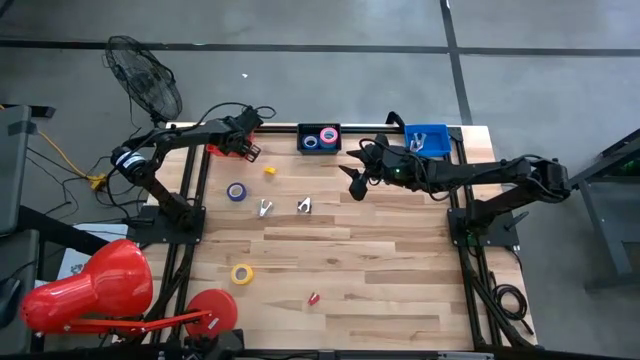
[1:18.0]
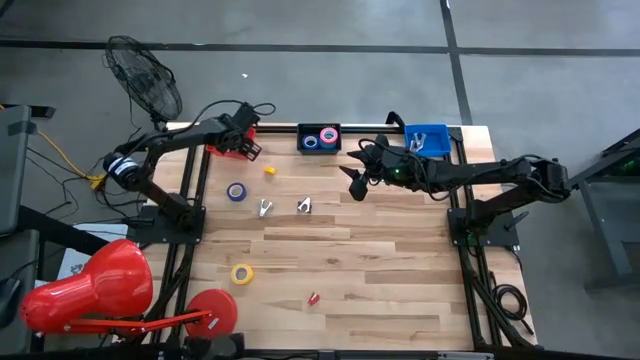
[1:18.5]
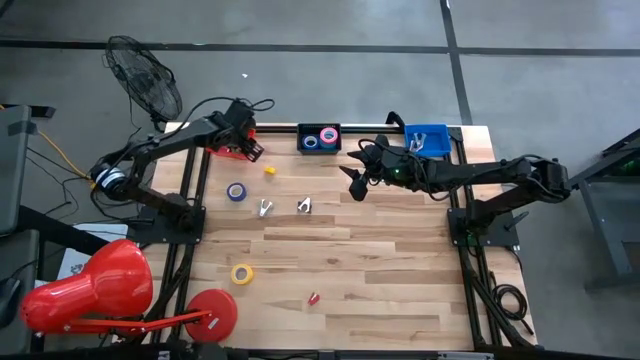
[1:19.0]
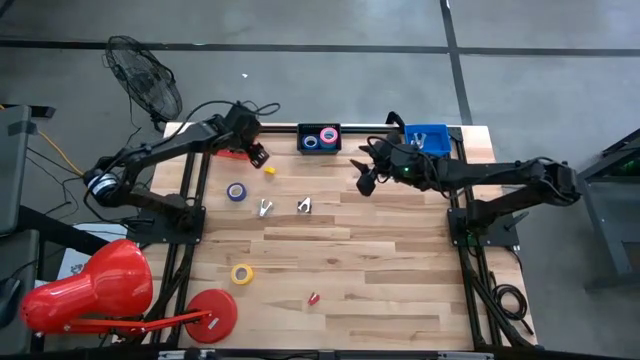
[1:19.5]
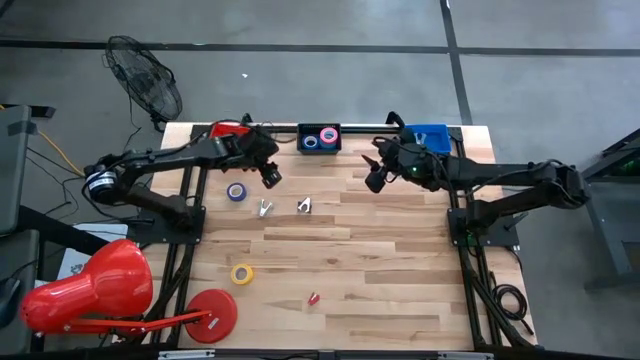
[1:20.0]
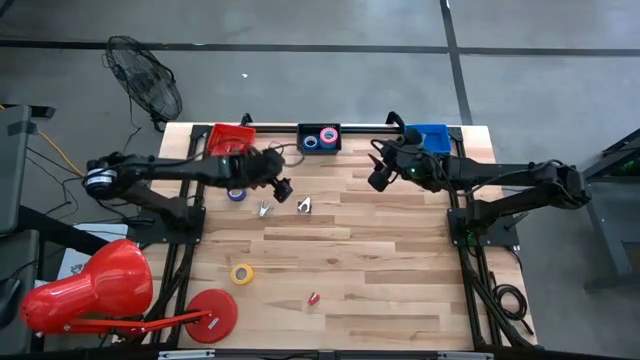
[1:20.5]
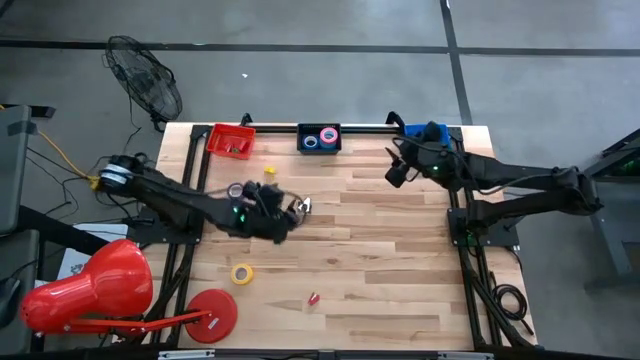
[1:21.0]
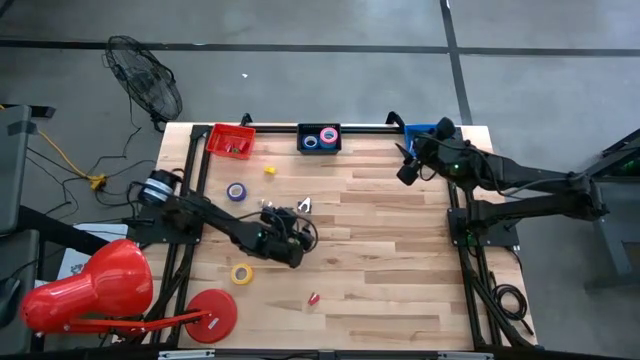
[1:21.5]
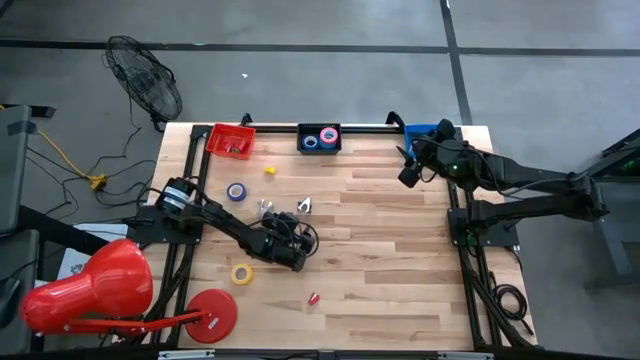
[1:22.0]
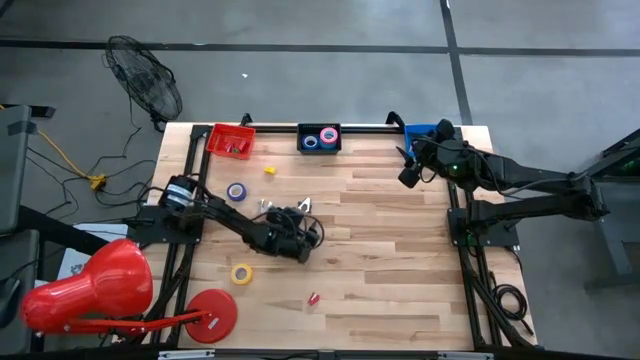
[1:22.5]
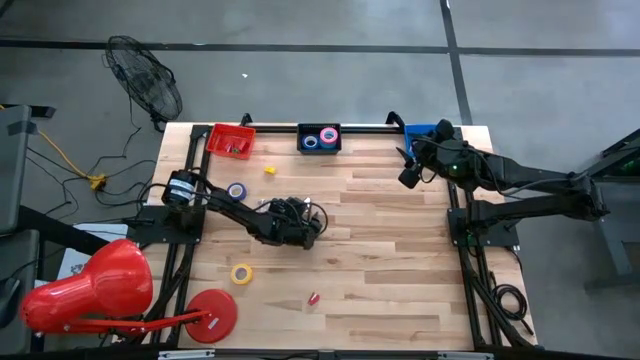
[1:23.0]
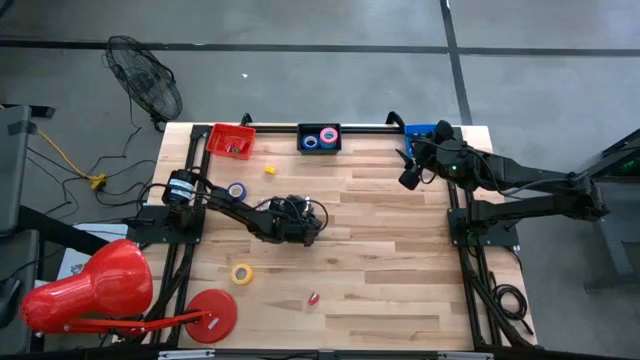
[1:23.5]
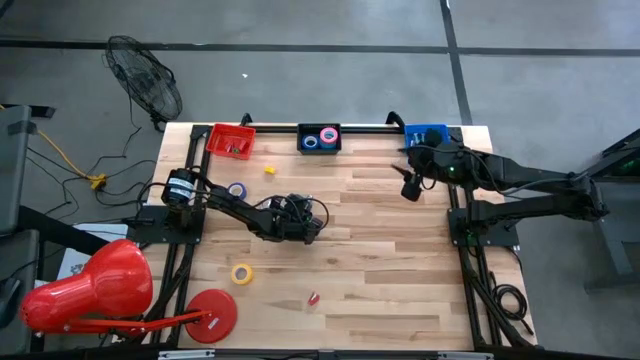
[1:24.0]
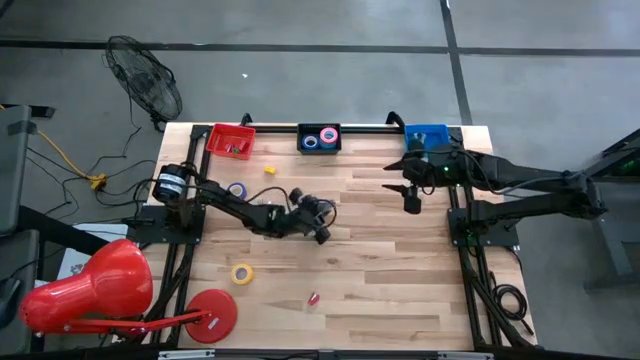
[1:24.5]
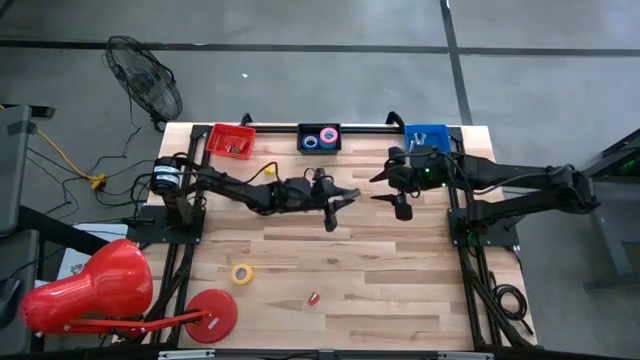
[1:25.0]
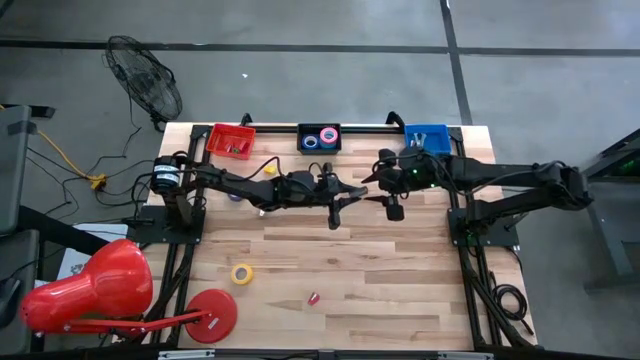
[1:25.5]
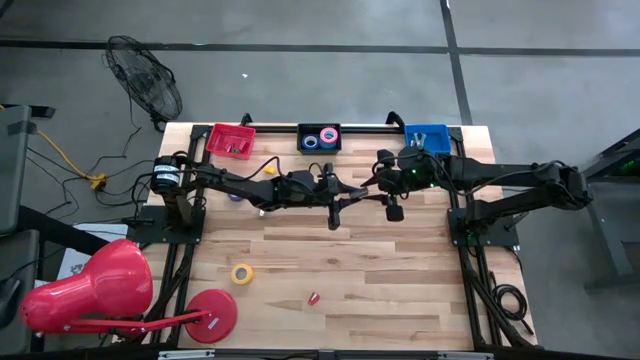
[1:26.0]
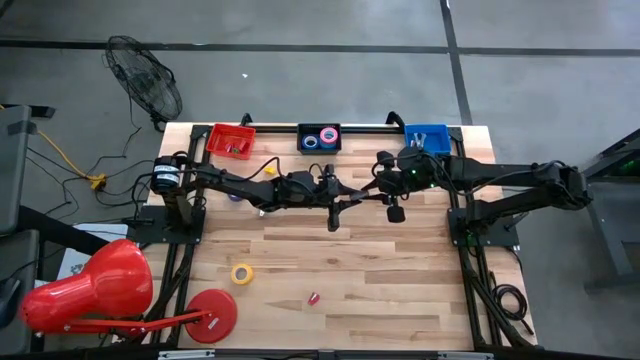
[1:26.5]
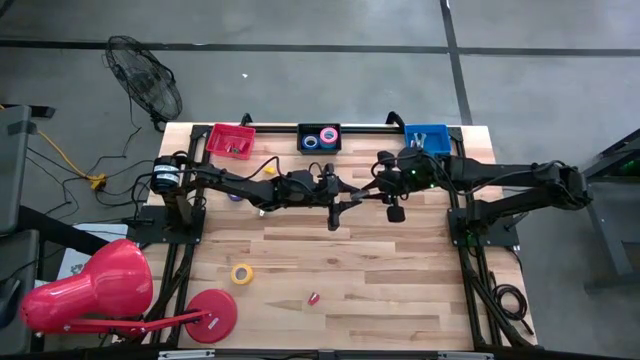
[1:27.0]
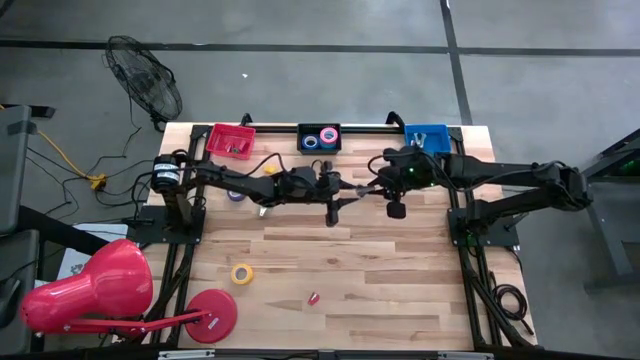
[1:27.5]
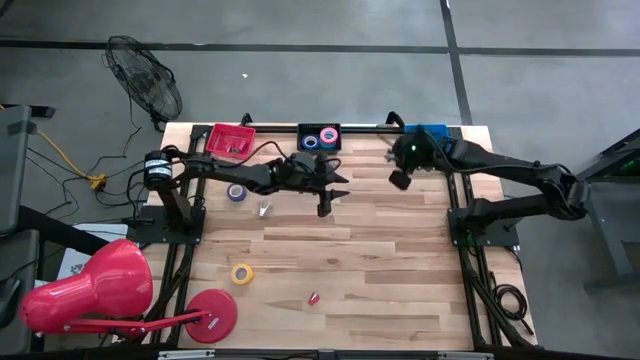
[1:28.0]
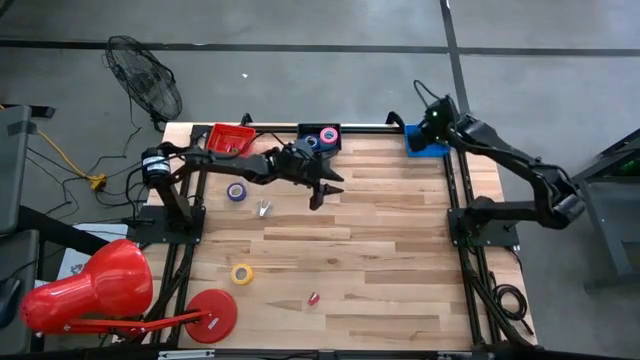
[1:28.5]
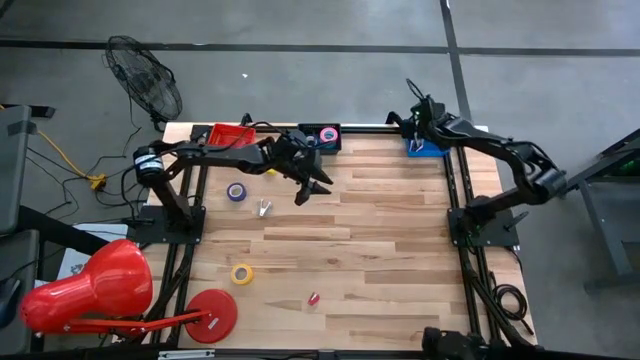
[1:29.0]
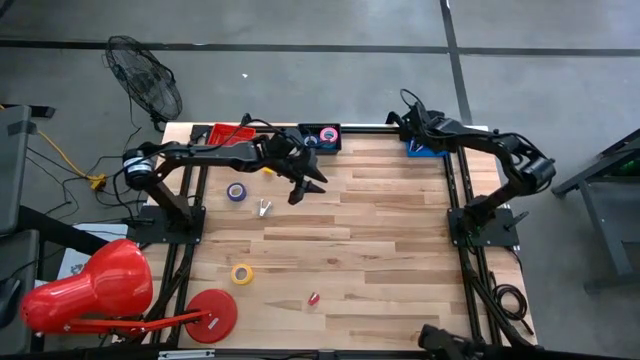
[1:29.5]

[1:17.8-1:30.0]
Task: Pick and place Stapler, Stapler remover, tape
Put the black staple remover into the blue bin

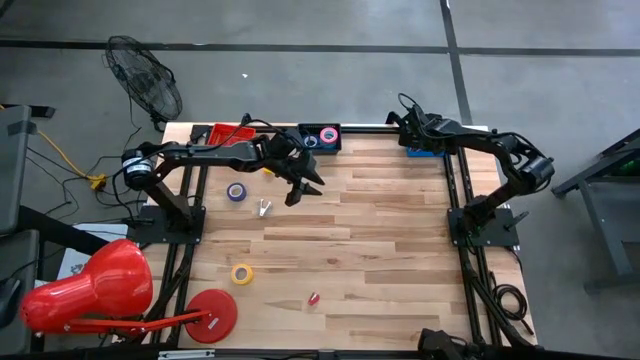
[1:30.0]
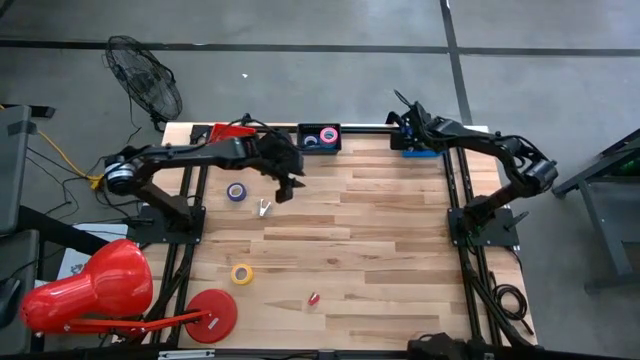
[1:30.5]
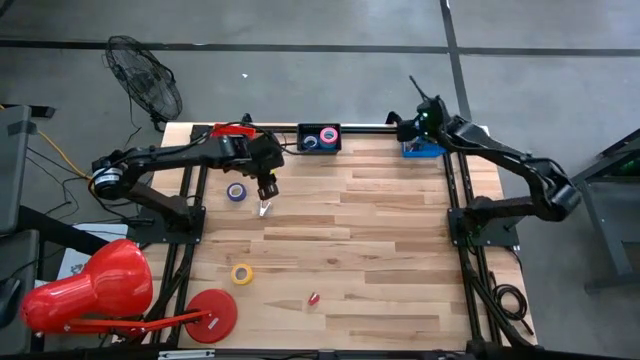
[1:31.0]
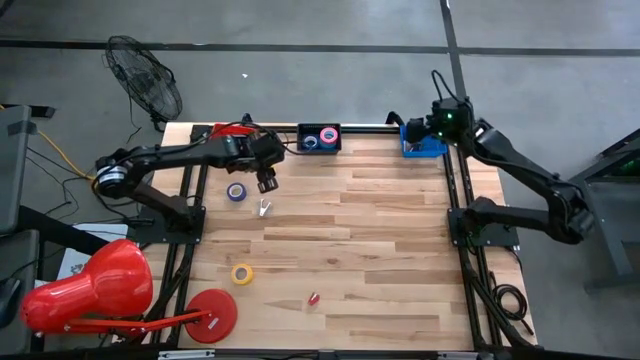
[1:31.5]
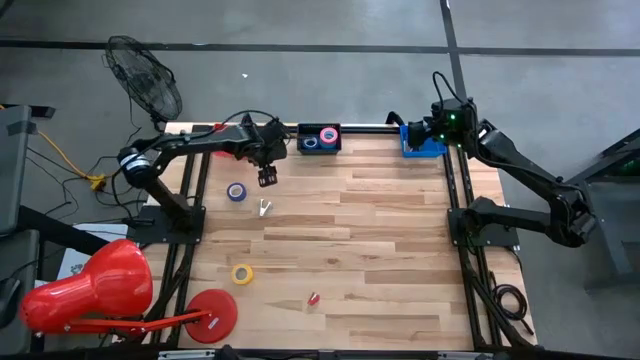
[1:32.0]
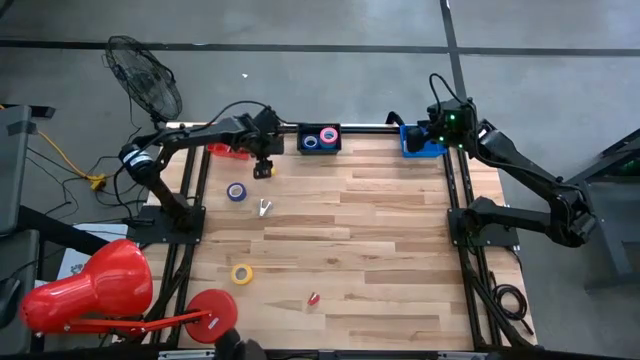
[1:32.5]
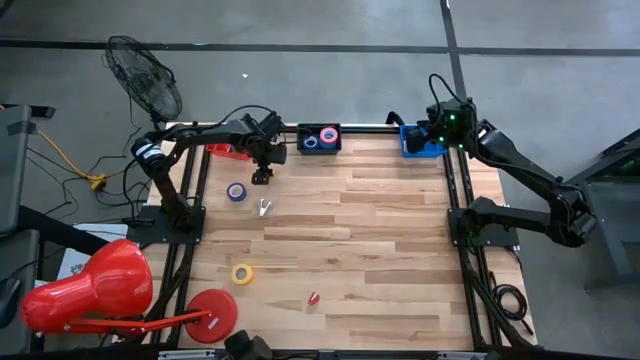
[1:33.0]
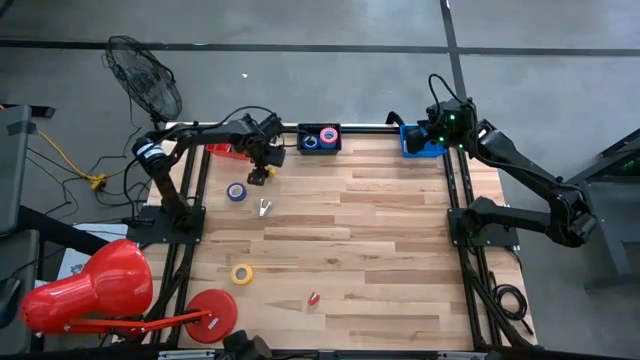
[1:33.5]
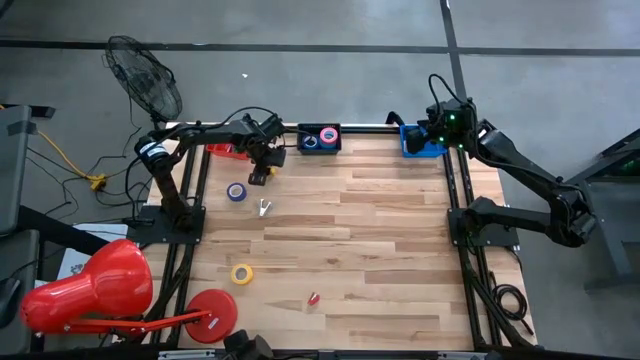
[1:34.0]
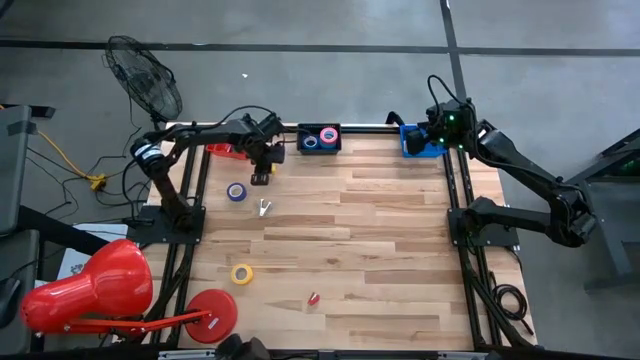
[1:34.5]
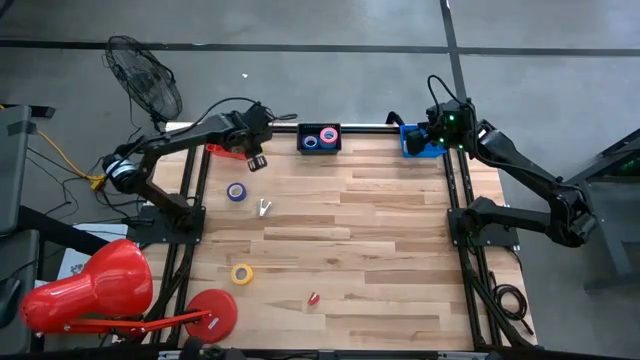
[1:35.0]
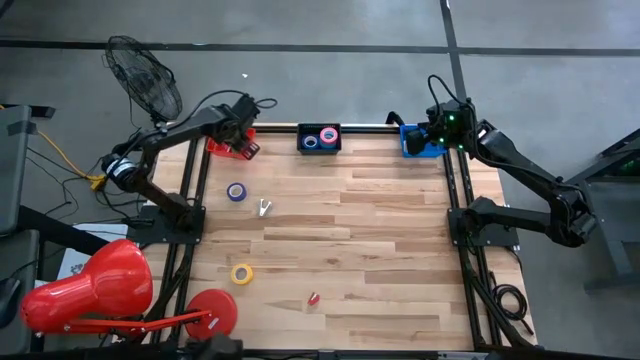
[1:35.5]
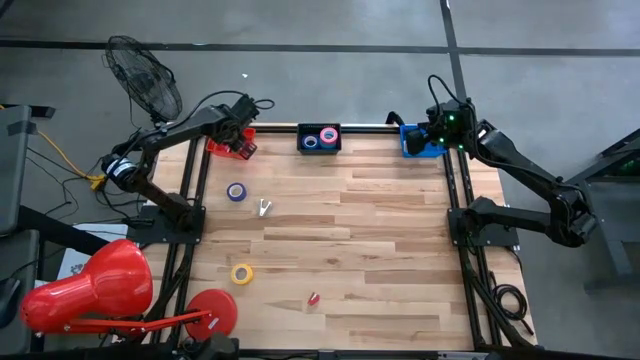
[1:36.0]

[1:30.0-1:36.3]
Put the yellow stapler into the red bin

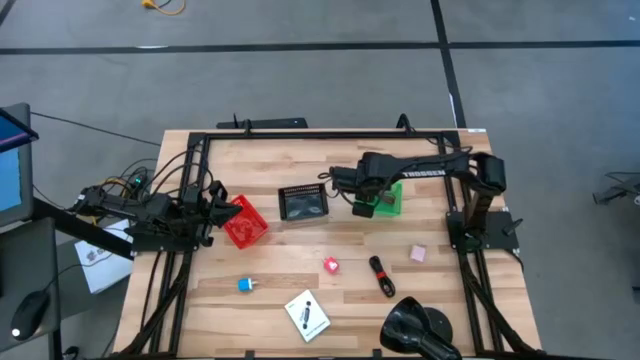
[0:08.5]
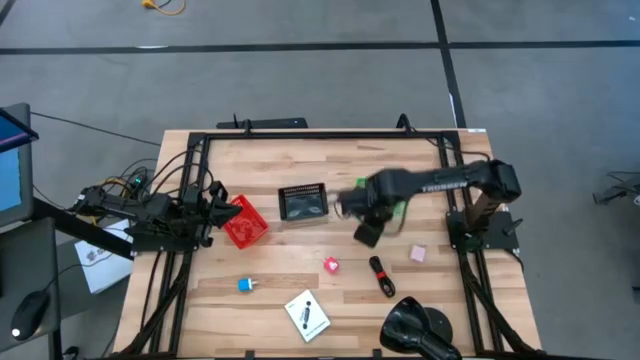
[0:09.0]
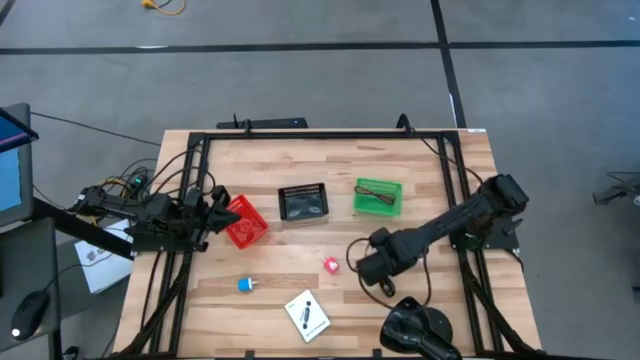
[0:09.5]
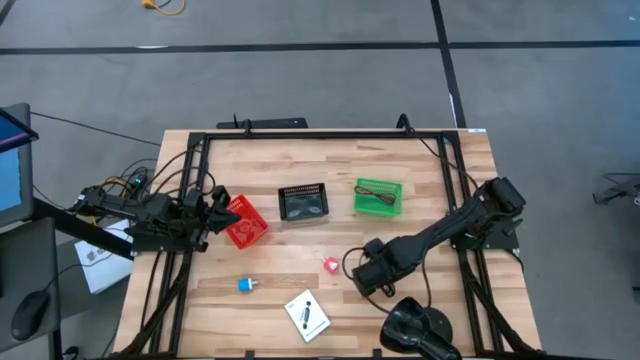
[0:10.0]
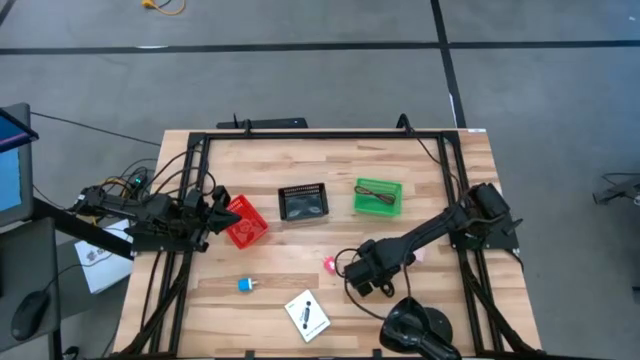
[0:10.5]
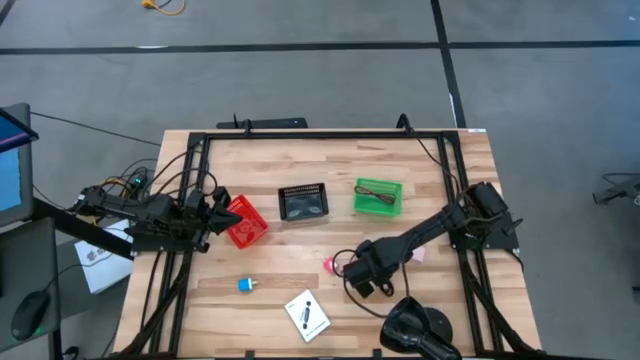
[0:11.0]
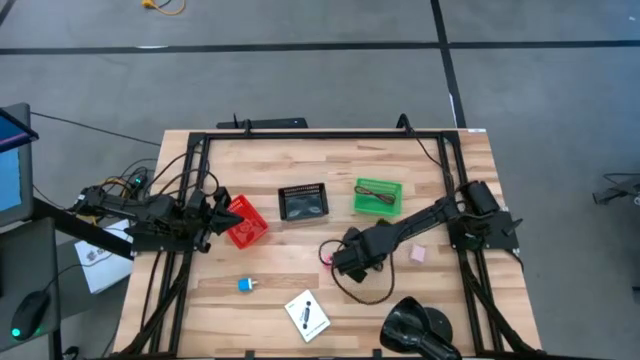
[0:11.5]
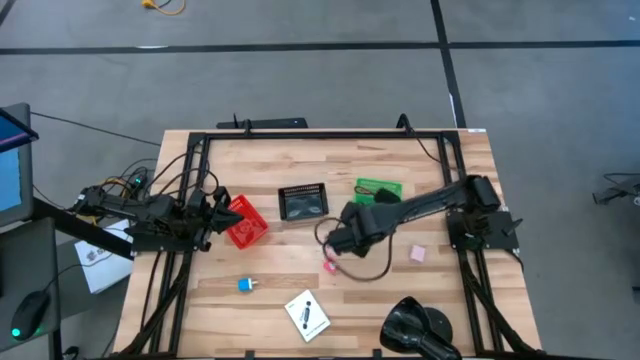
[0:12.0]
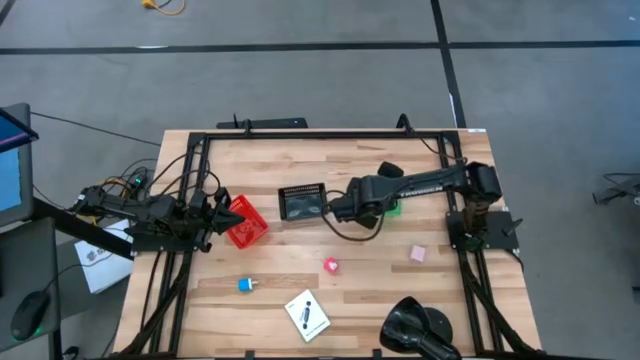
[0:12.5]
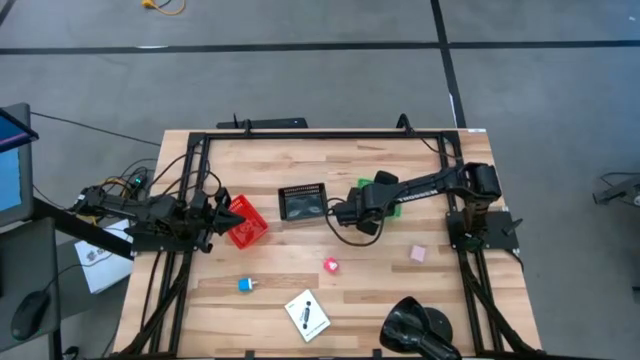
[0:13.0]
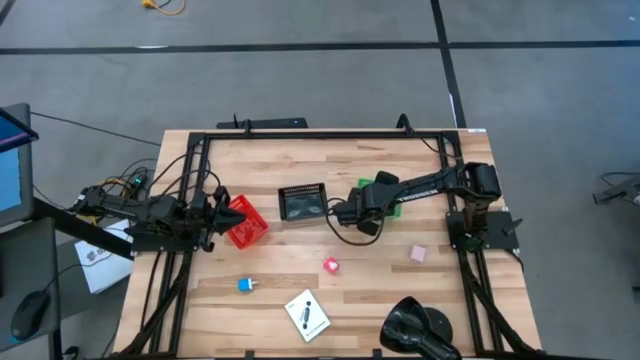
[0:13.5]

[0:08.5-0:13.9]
Task: Pick and place items into bin
Put the black charger cable into the green bin
